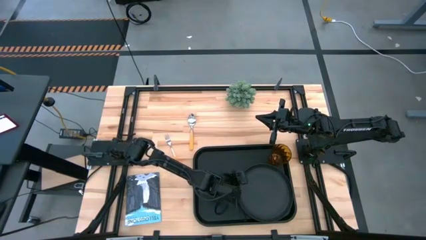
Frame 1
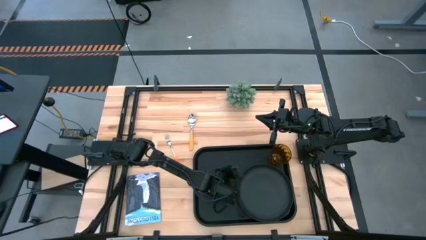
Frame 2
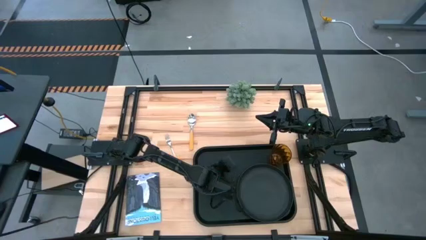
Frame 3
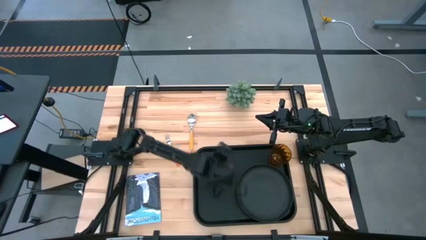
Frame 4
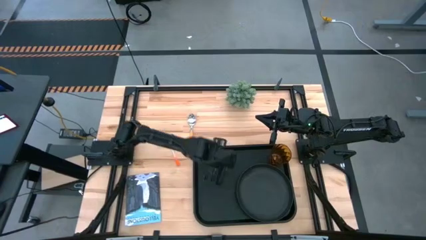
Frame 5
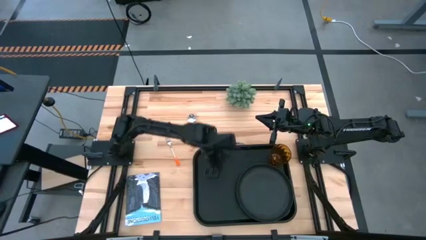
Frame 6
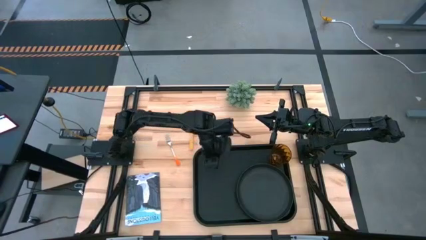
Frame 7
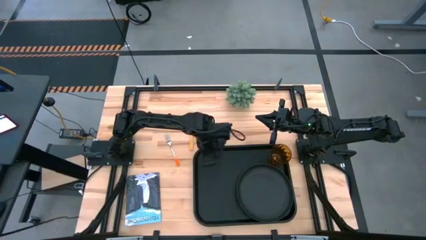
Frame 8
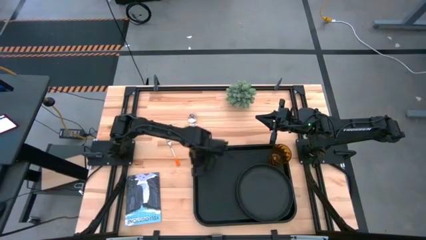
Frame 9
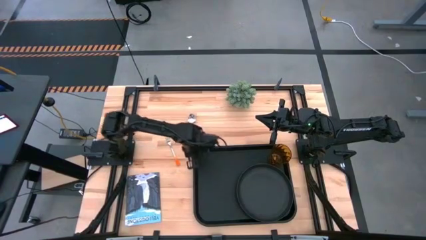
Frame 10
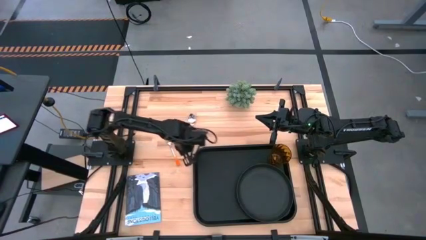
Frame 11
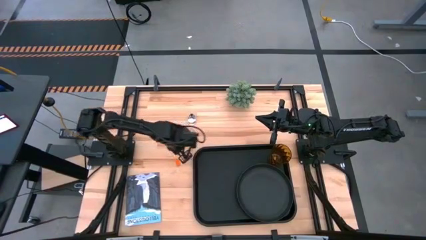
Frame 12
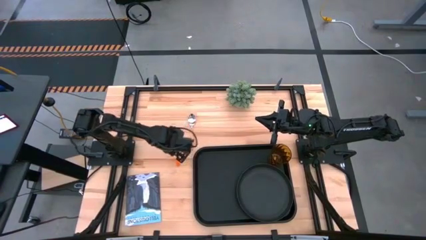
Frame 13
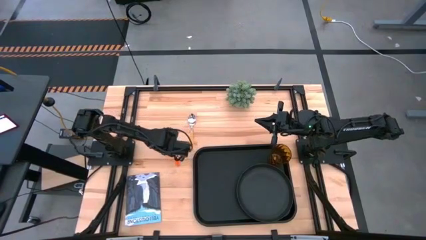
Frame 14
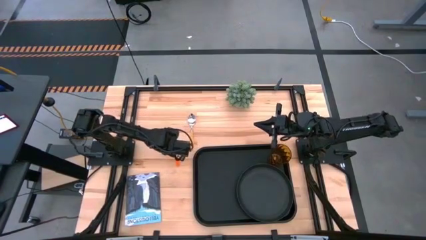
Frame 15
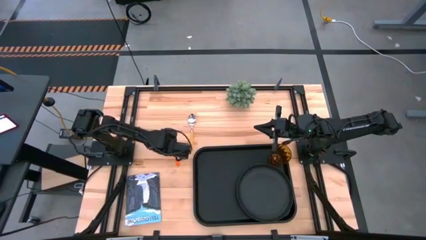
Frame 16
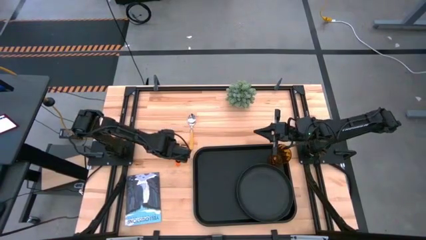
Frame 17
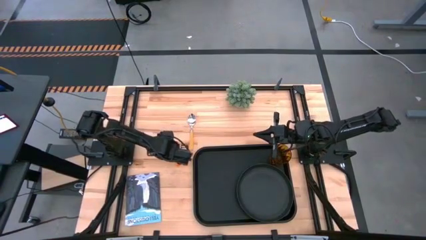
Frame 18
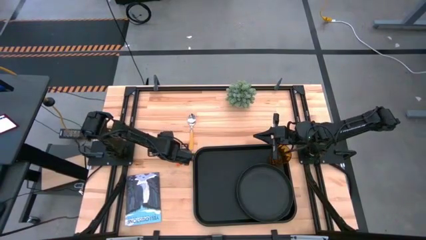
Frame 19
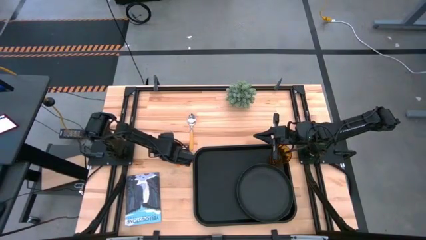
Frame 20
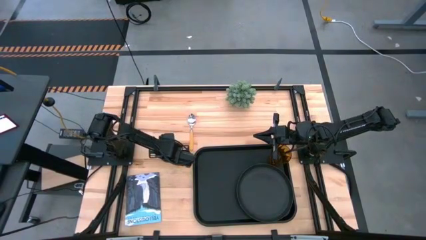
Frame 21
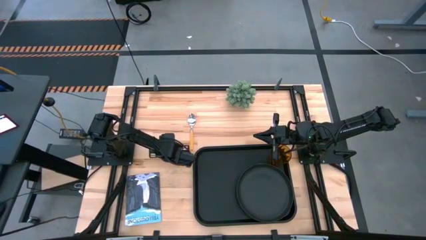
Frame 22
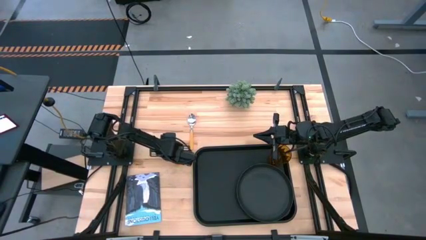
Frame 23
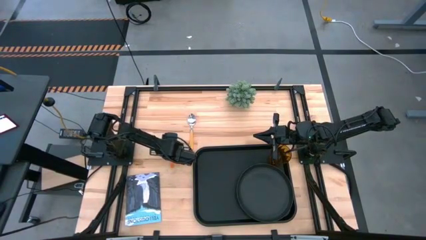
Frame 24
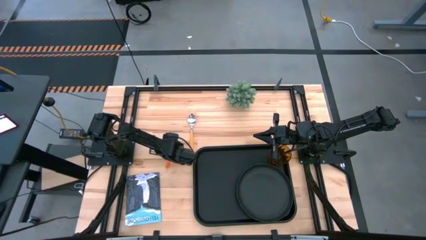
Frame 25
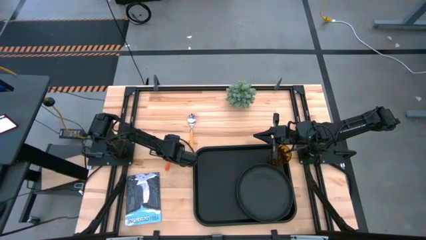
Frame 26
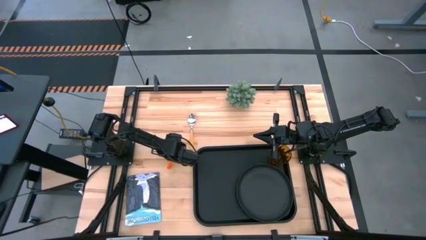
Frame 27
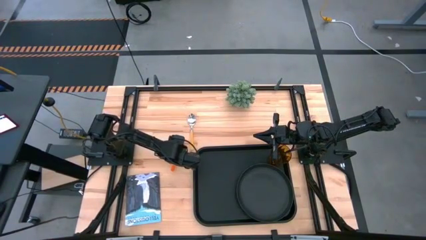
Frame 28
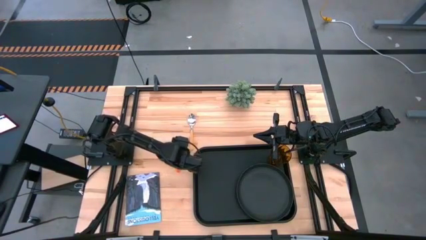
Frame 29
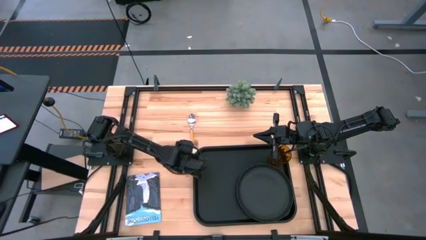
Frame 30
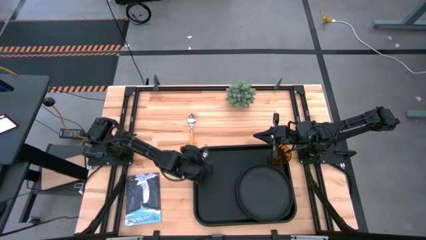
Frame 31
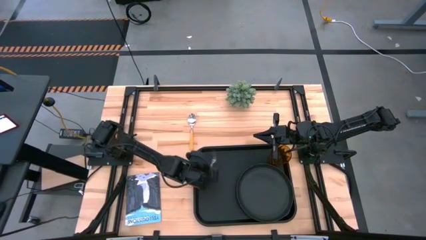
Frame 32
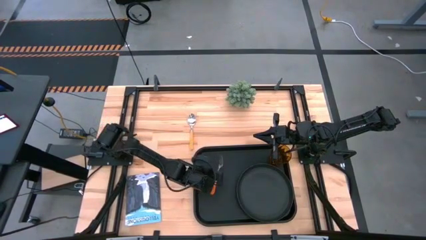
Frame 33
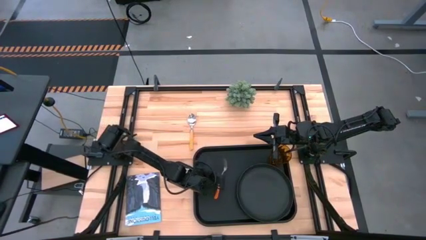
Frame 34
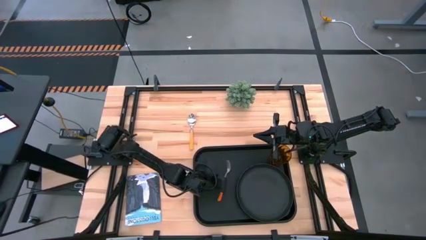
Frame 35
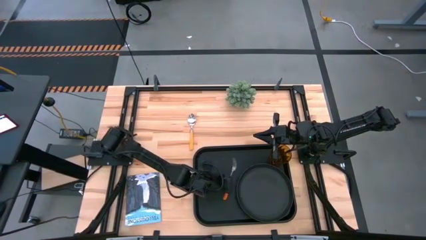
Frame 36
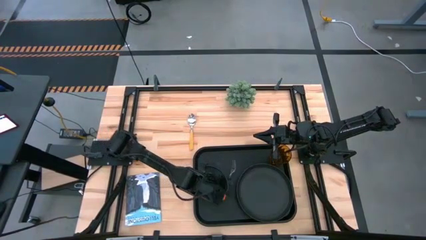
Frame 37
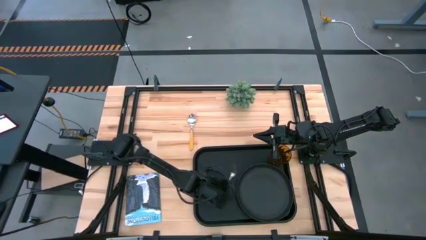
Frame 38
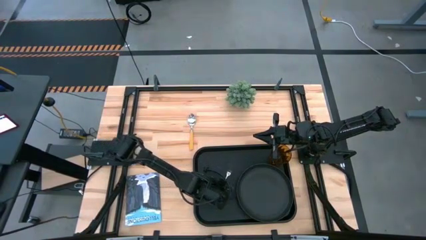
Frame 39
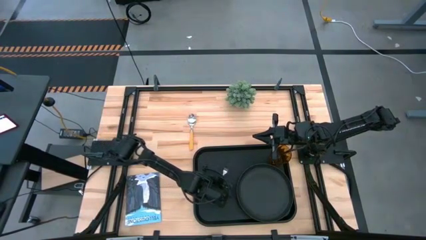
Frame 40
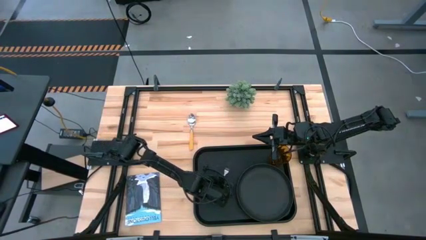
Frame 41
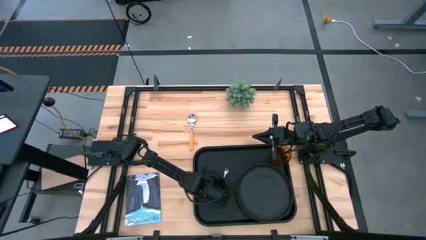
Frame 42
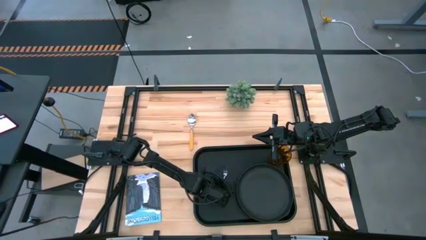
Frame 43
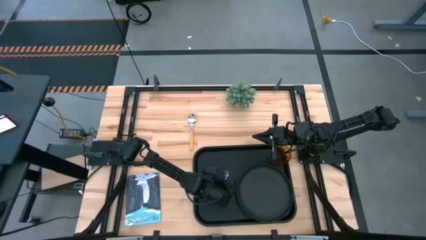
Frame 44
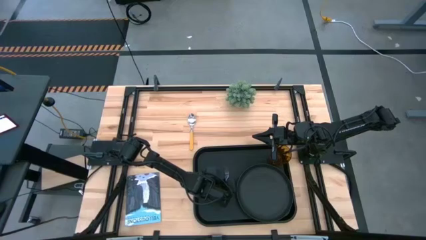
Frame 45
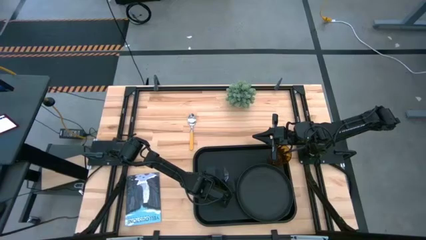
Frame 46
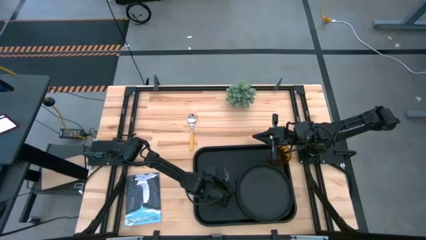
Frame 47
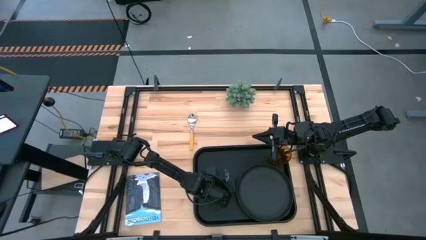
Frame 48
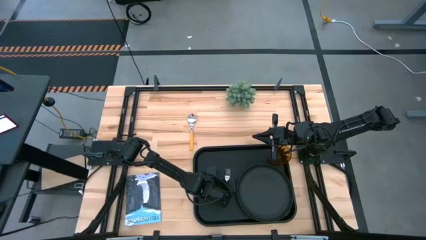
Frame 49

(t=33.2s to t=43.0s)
Task: Pick and place plate/cup/fork/spoon on tray
Put the orange fork on the black serving tray to the left of the black plate

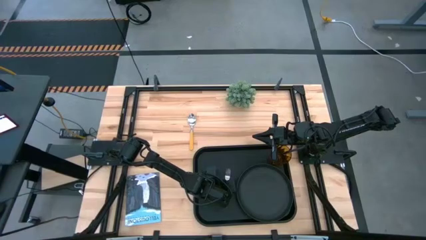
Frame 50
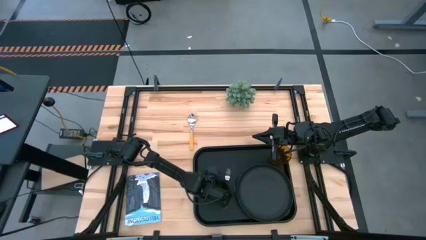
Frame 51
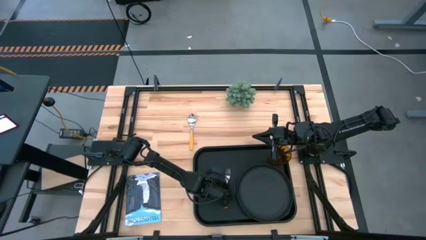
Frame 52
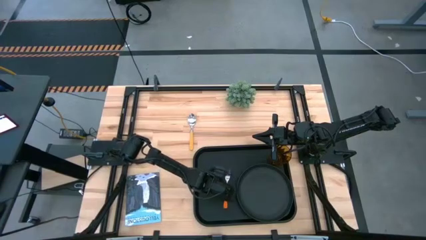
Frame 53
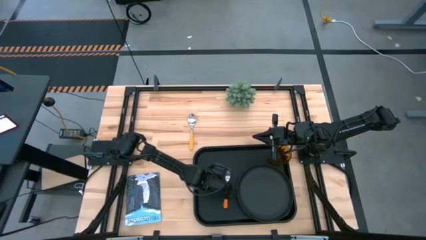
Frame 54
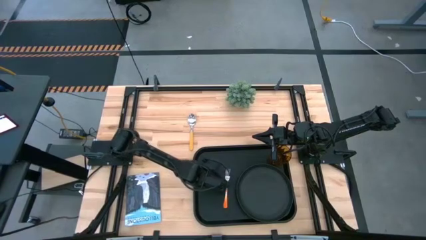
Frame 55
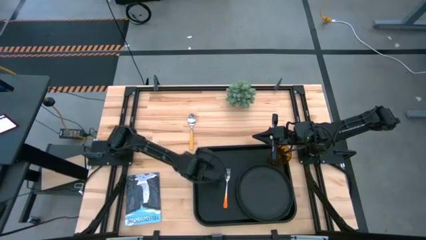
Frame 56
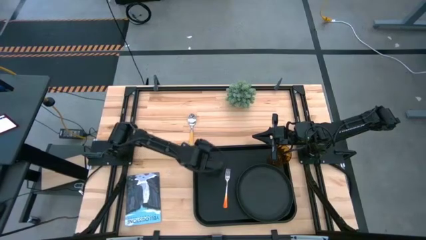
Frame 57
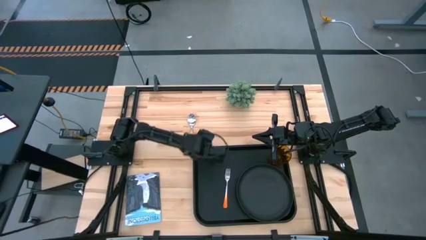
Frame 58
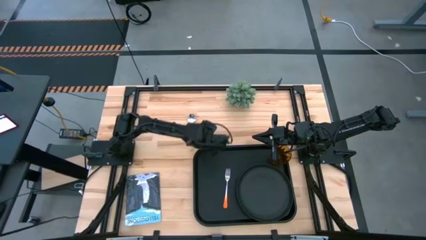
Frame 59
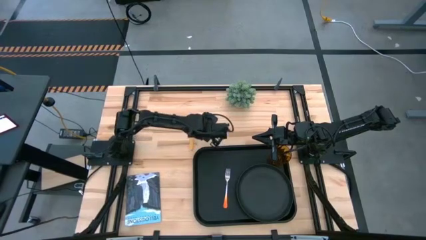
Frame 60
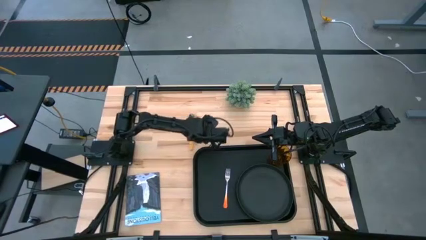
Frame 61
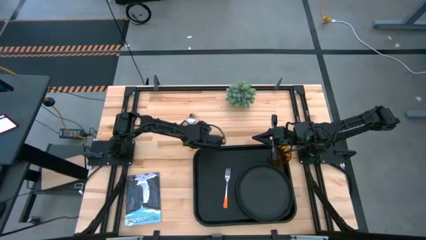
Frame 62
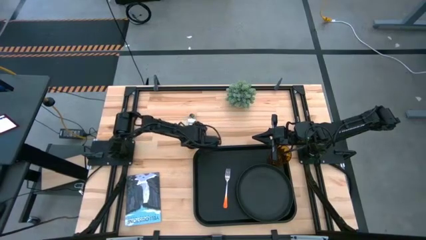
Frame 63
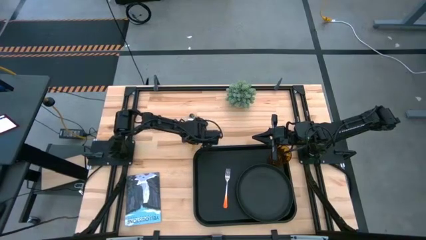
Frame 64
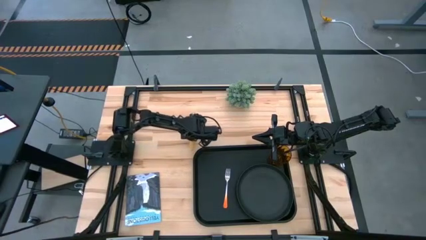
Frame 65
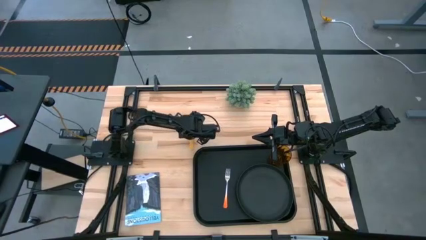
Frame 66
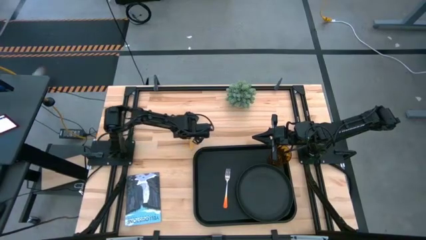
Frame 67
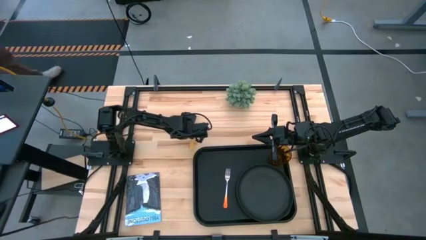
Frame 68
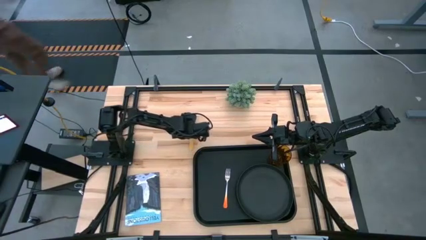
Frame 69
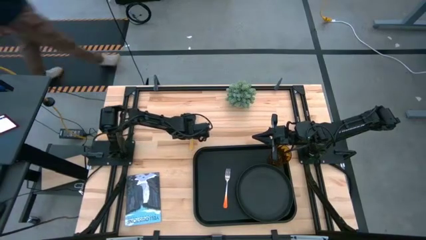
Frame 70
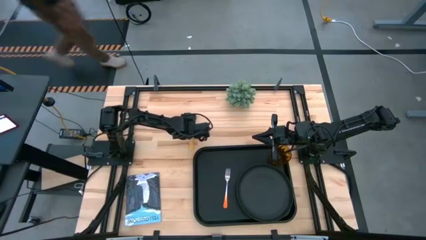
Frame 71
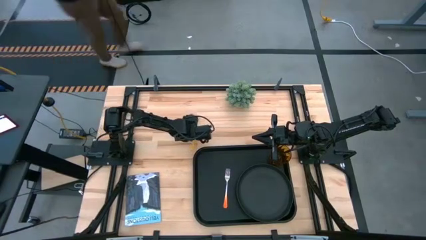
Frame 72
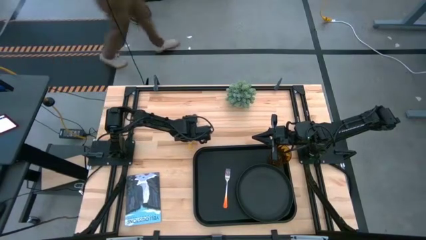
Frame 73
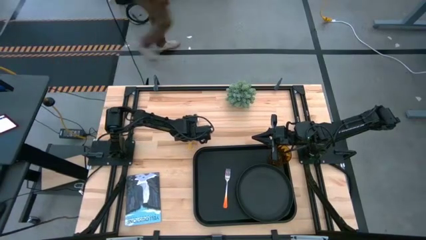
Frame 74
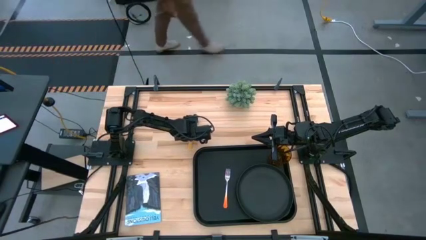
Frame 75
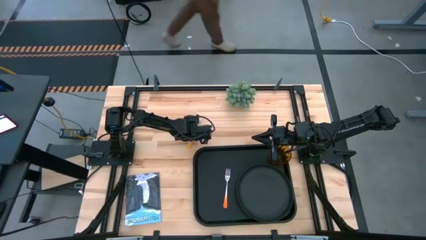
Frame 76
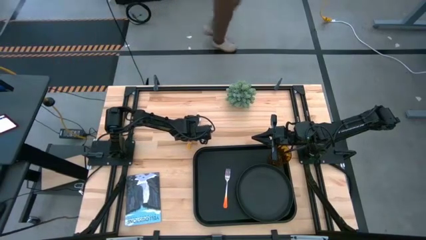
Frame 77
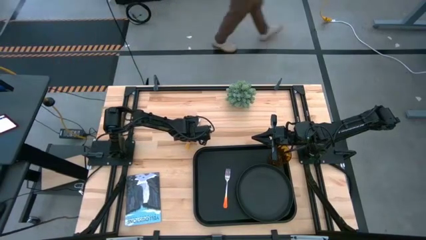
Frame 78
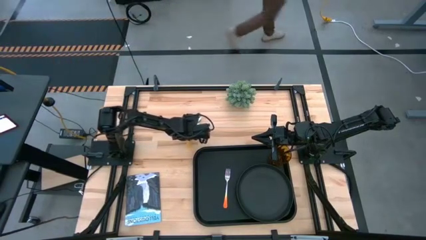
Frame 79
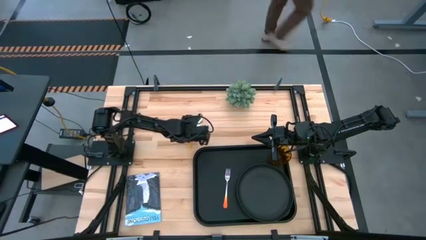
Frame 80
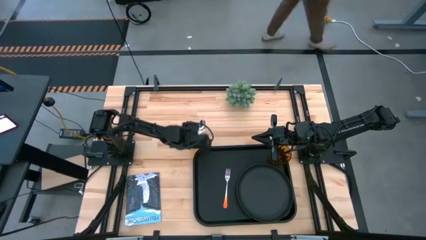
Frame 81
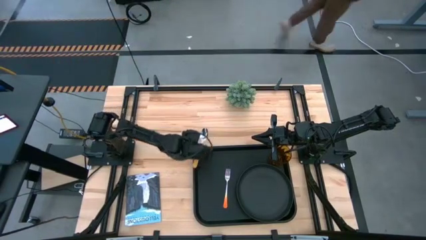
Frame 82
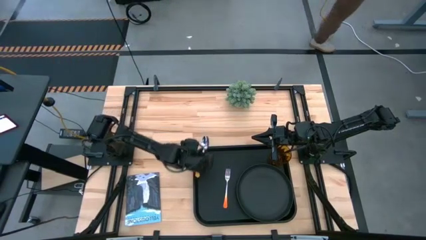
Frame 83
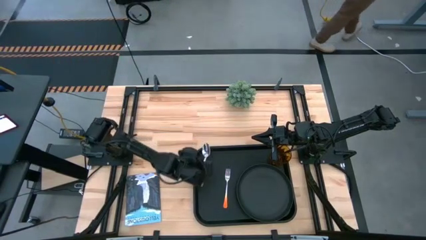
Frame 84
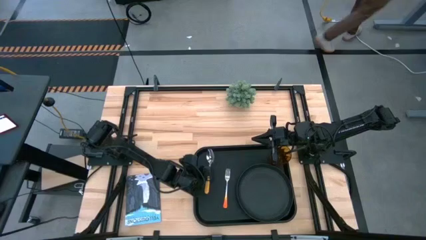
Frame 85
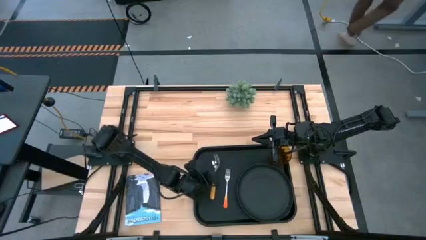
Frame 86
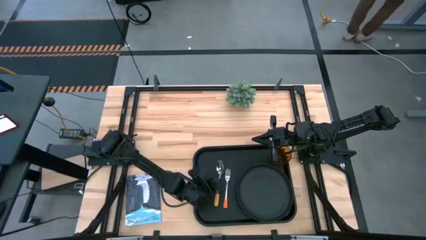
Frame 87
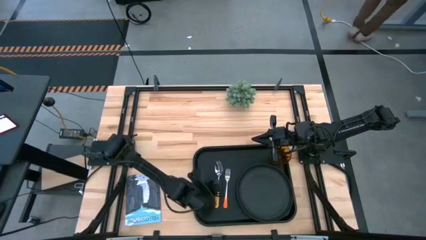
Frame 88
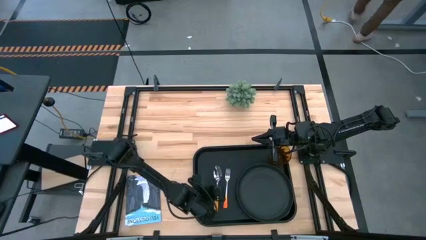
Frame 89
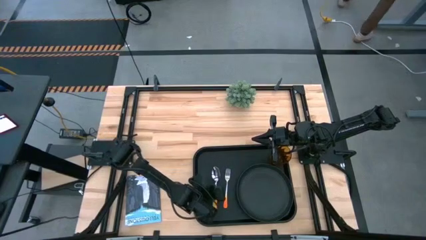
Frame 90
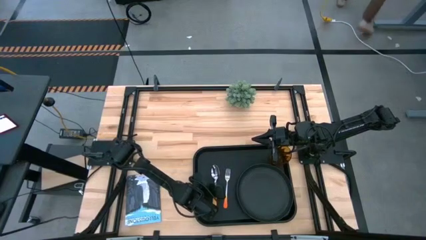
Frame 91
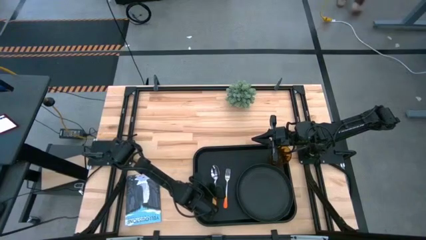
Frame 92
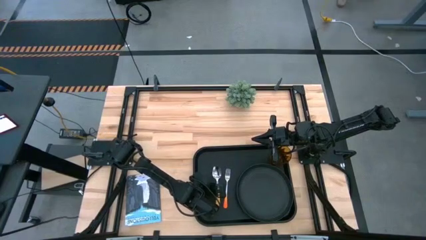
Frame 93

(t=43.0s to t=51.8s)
Put the yellow spoon on the black serving tray to the left of the orange fork
